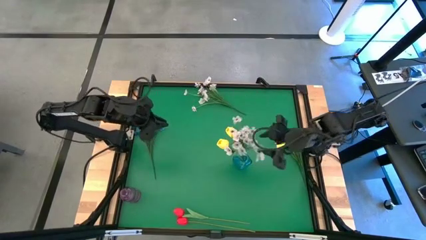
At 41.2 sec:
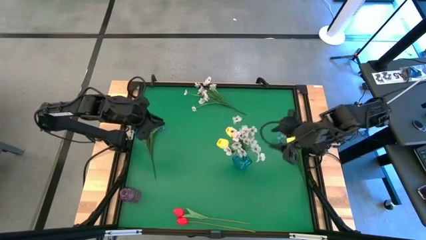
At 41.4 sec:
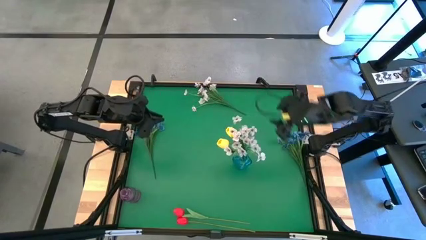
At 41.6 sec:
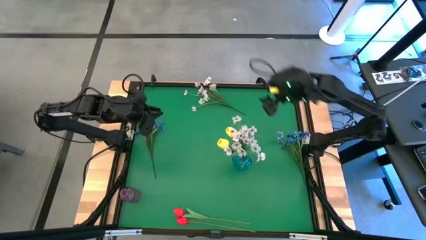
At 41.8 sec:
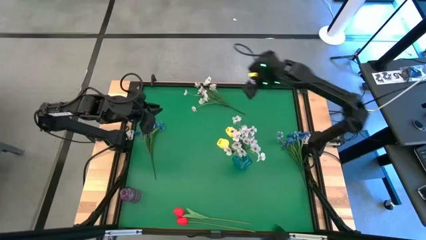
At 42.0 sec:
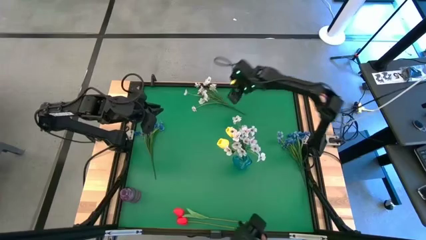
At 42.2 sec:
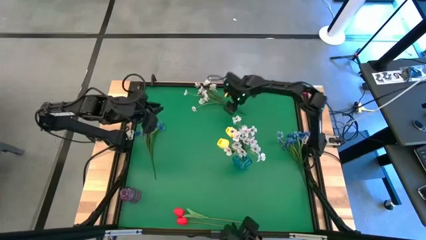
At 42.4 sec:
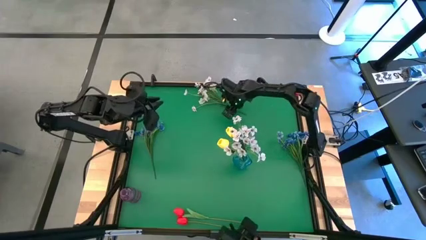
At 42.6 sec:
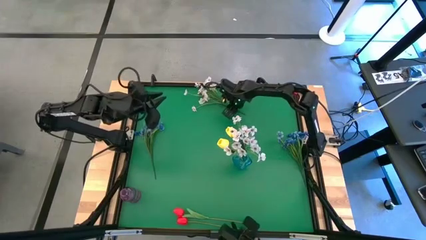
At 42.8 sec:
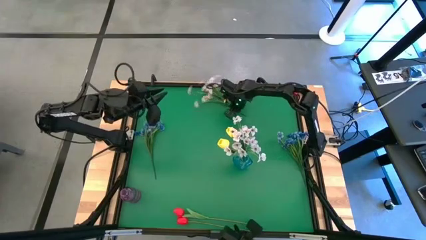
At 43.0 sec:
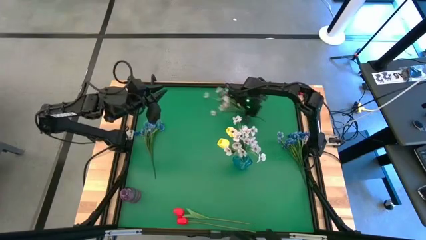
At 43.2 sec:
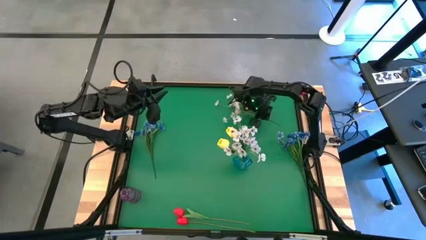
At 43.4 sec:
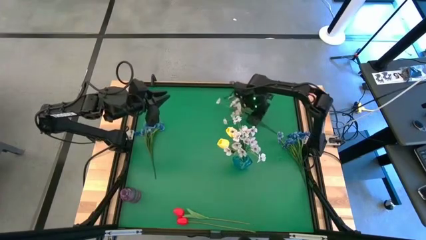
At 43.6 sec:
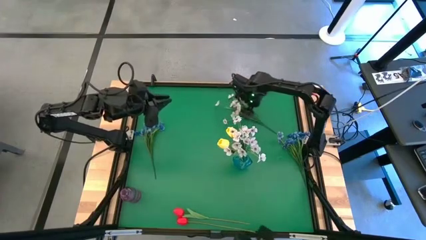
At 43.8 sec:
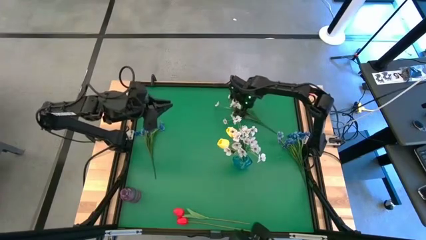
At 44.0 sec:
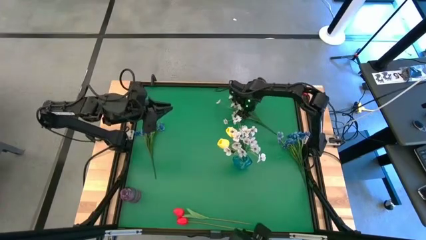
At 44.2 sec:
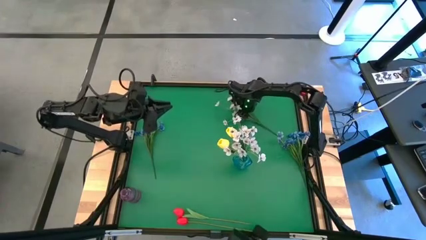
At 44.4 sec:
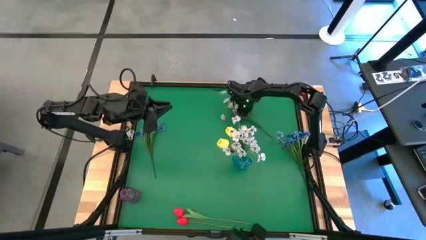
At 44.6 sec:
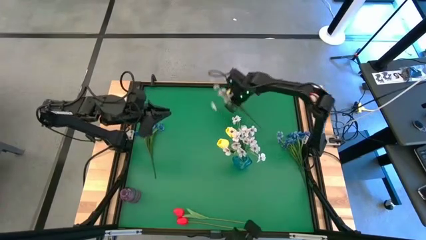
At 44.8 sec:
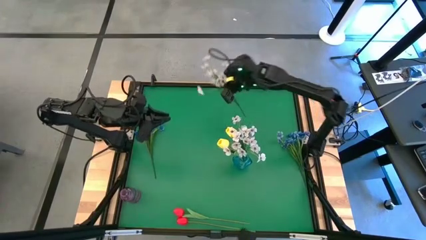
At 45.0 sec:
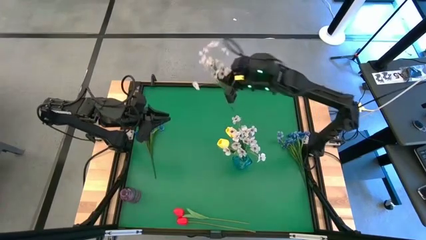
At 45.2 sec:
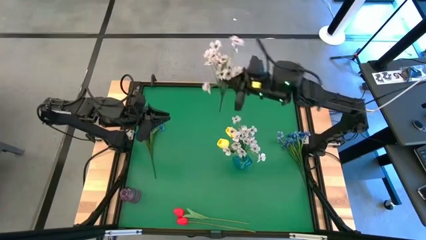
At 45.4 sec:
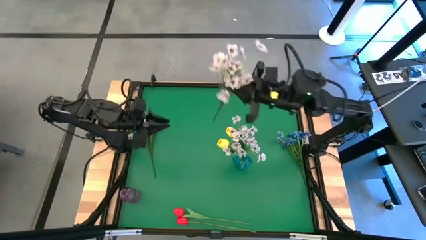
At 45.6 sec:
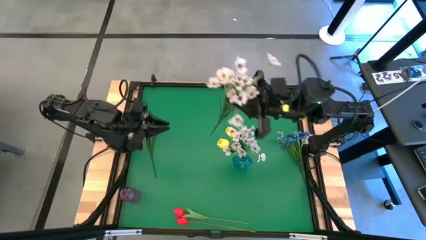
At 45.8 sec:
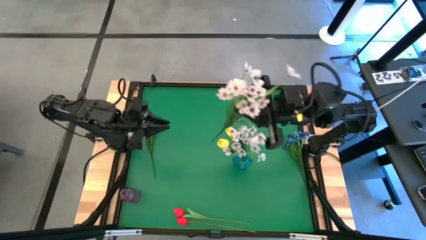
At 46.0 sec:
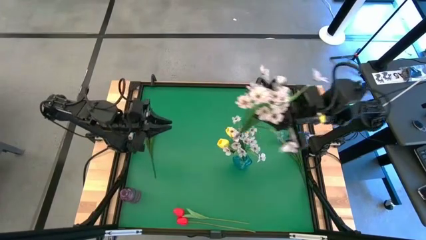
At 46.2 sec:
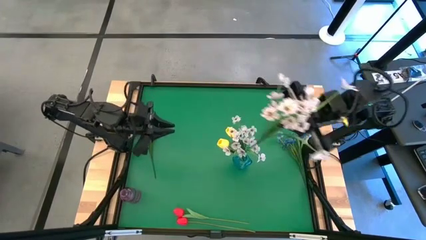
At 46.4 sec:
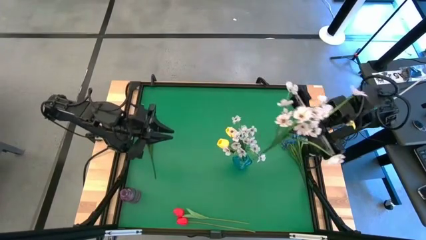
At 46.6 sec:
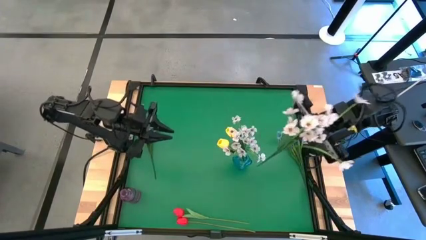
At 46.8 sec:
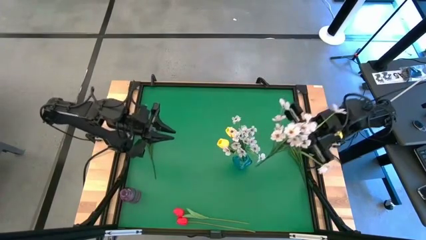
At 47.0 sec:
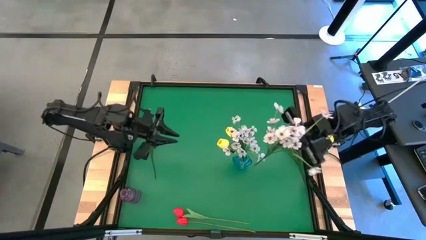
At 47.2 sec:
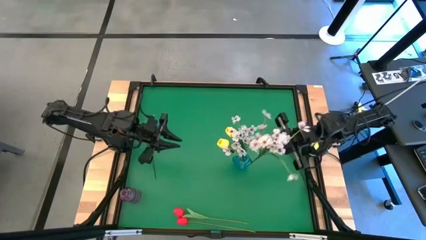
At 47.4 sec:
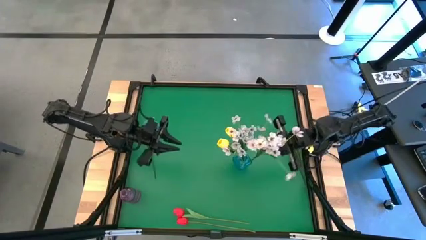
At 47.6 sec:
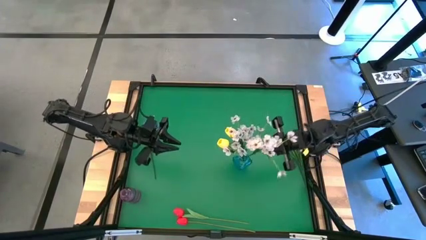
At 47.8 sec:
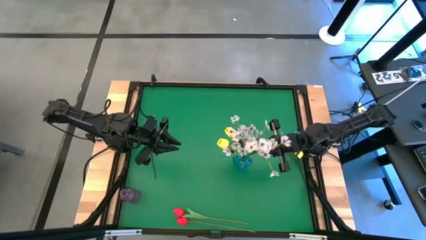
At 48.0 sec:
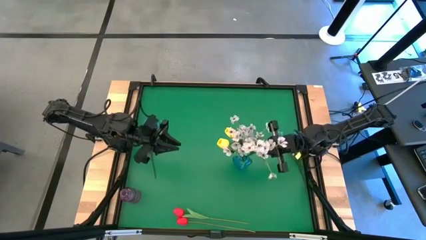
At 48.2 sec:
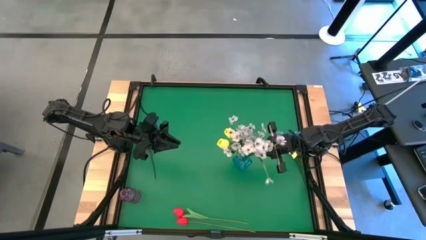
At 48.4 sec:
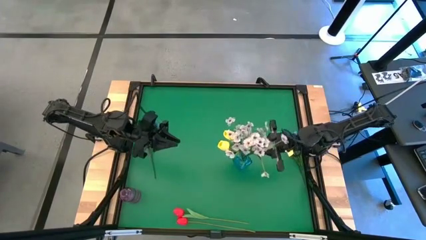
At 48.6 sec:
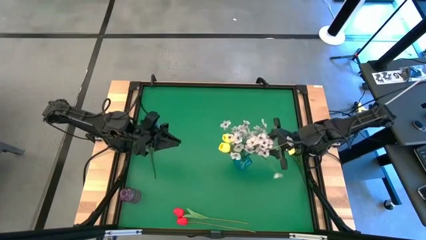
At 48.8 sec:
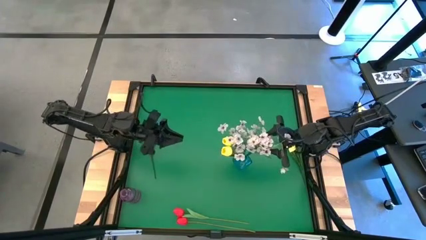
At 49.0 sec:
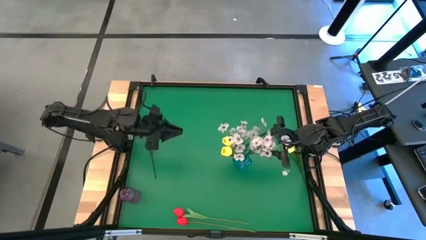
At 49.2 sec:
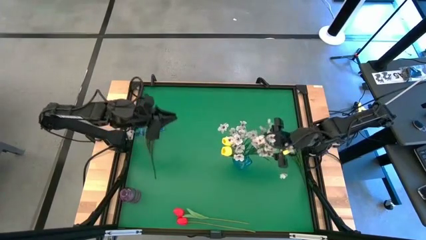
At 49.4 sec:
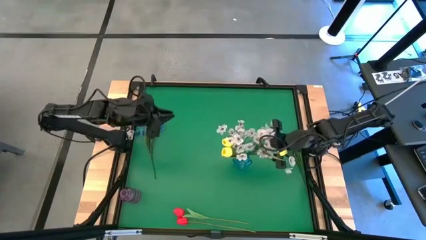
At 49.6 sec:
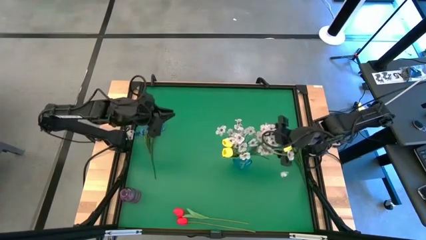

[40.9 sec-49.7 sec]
Task: Sort flowers into vase by color
Put the white flowers into the blue vase

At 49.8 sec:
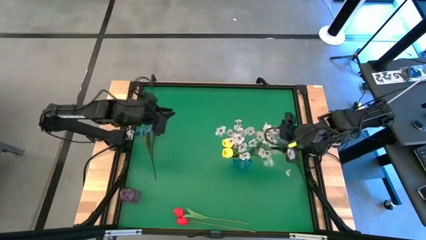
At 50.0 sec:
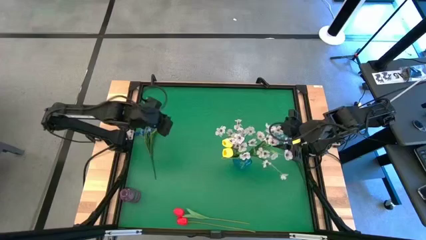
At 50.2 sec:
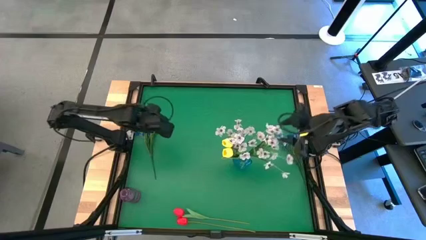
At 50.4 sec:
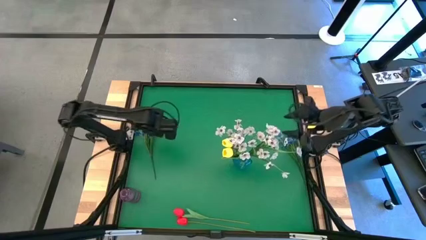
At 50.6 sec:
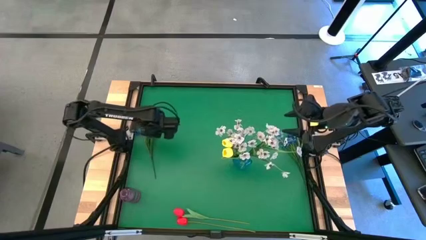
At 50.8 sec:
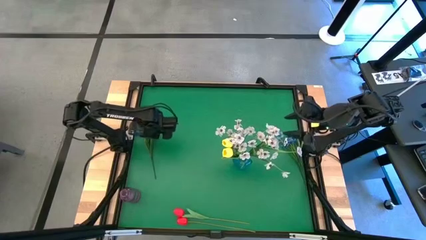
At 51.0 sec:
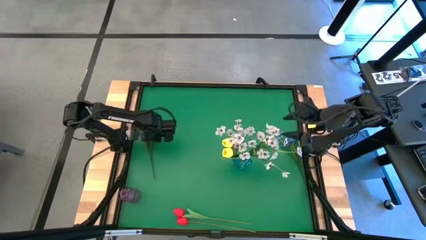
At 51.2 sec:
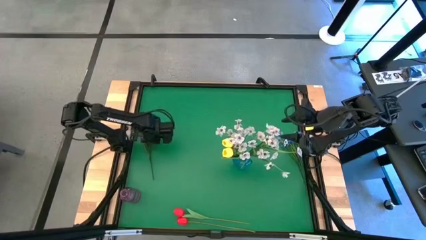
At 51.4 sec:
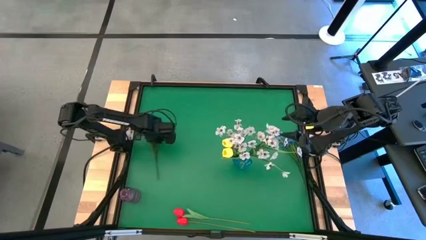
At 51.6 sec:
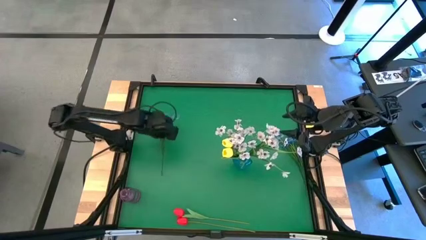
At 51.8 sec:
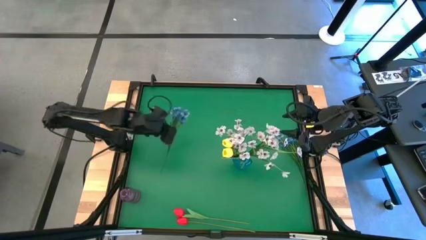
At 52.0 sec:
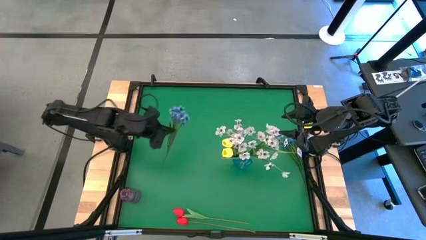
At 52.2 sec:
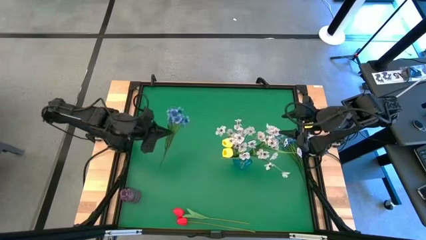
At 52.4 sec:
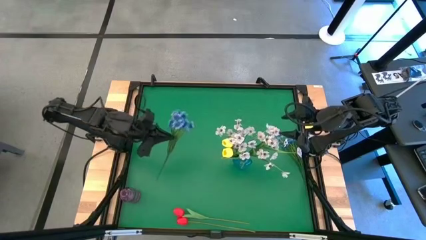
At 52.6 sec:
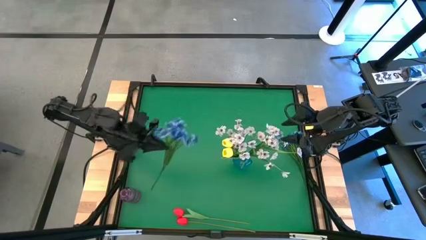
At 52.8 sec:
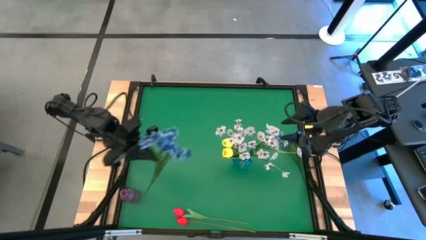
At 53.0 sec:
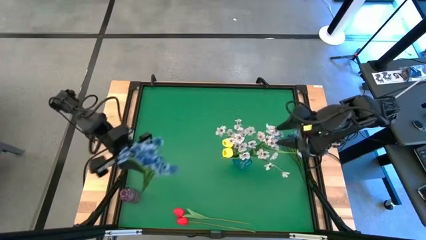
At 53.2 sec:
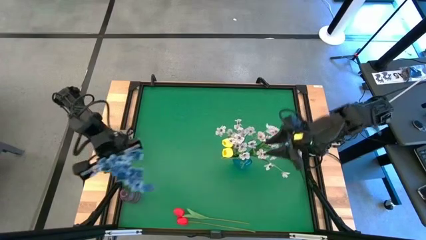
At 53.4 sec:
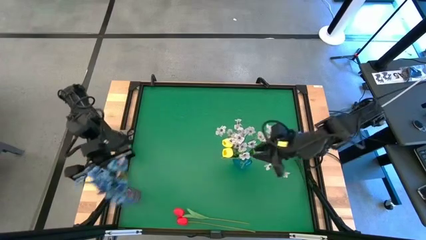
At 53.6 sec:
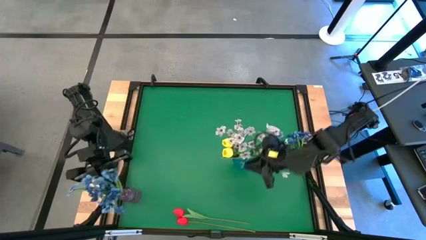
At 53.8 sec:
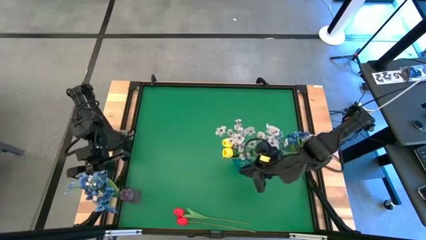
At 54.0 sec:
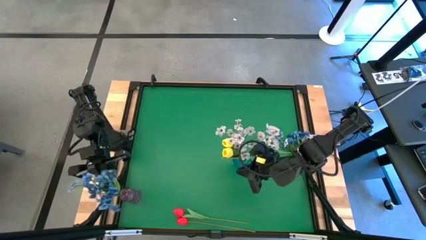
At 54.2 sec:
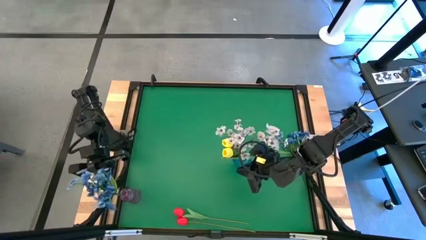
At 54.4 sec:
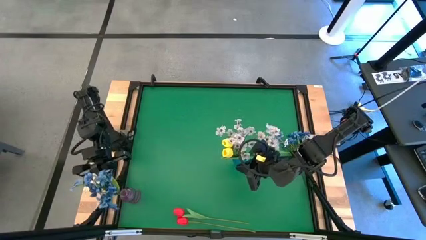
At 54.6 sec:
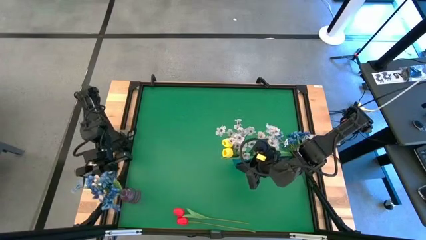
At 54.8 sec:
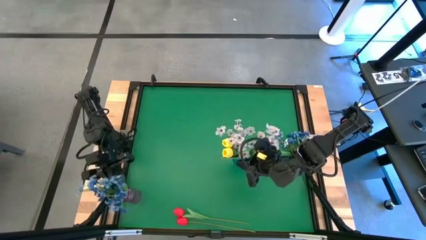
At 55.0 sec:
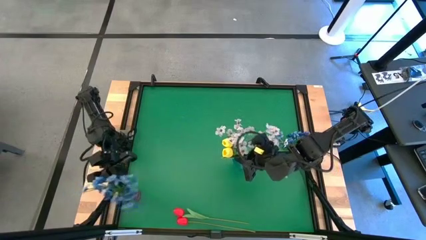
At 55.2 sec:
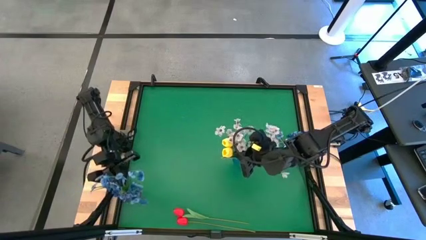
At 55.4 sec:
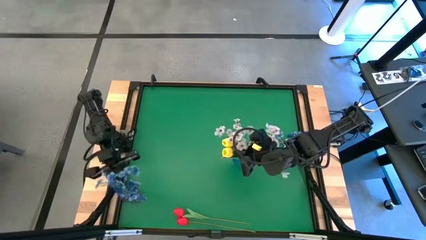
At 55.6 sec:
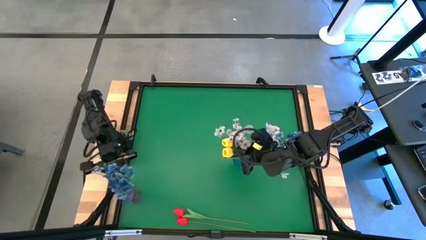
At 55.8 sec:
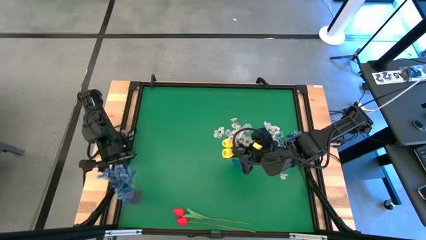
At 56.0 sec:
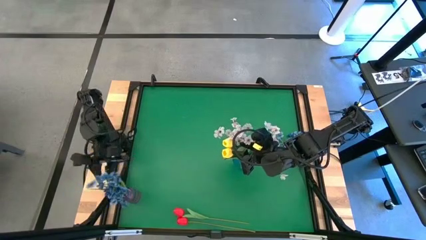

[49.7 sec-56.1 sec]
Put the left blue flowers into the violet vase
